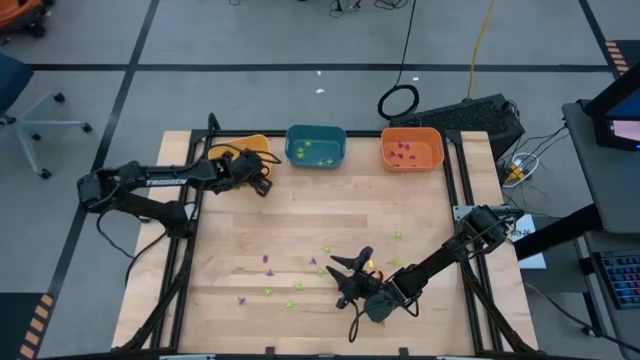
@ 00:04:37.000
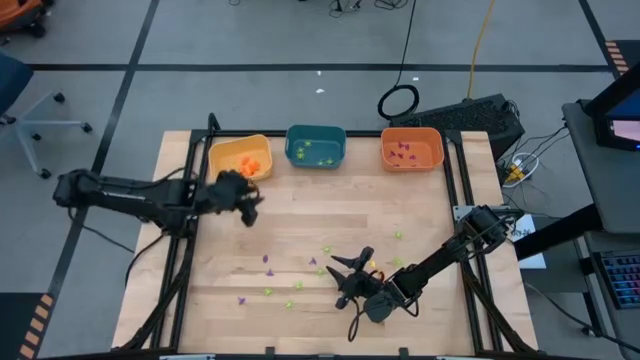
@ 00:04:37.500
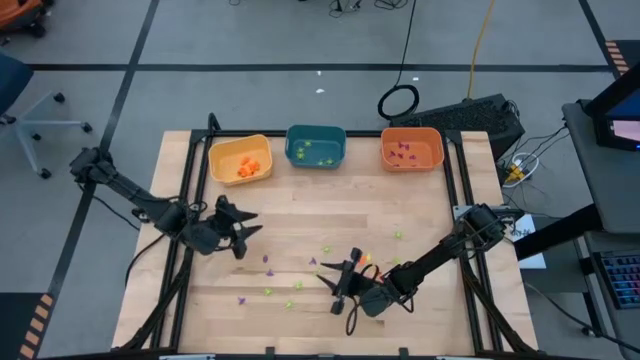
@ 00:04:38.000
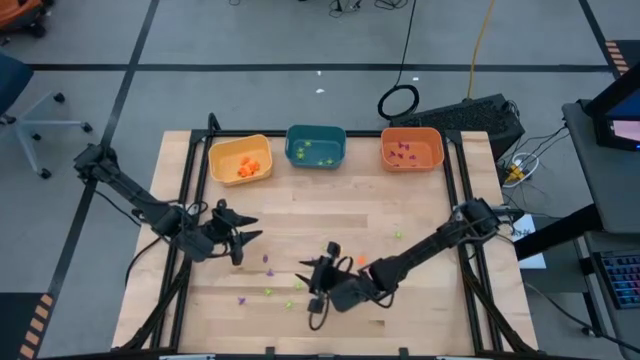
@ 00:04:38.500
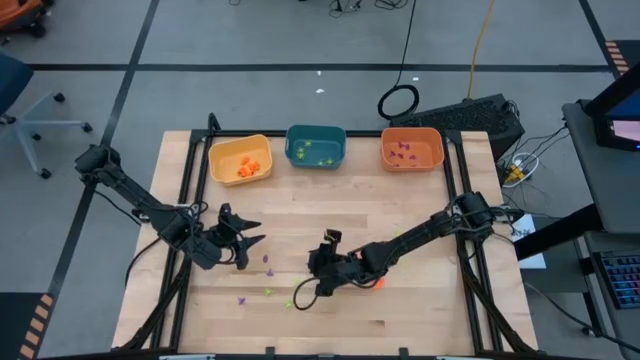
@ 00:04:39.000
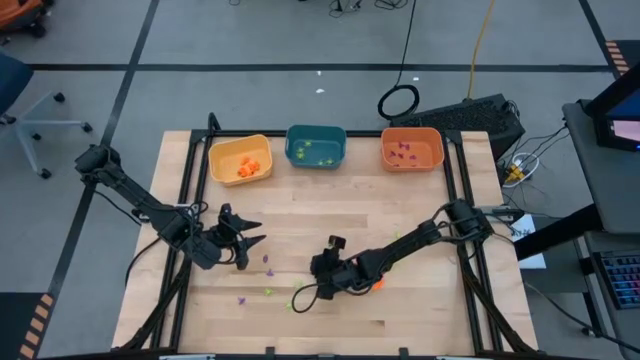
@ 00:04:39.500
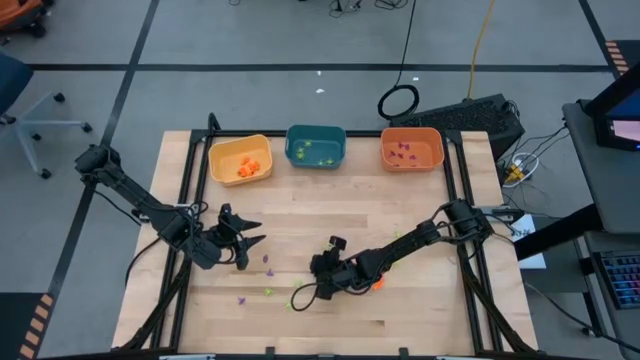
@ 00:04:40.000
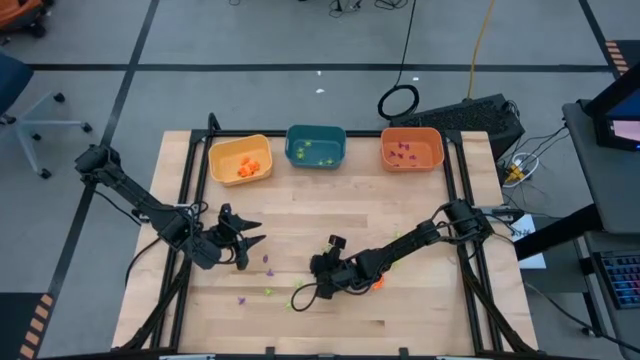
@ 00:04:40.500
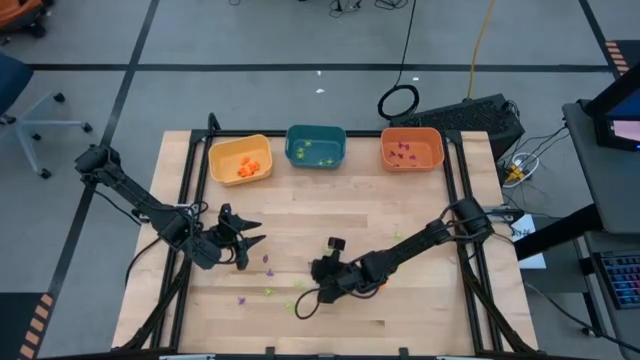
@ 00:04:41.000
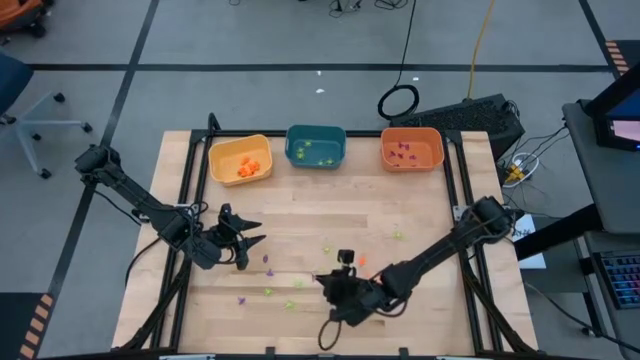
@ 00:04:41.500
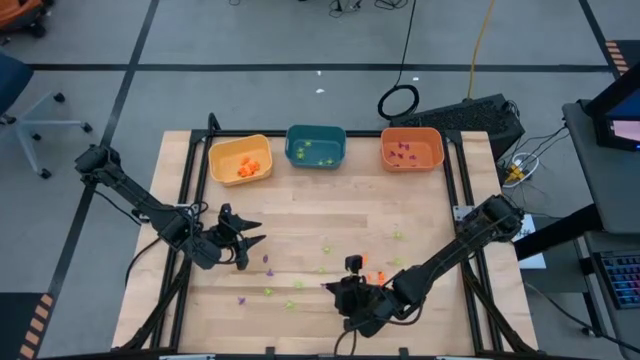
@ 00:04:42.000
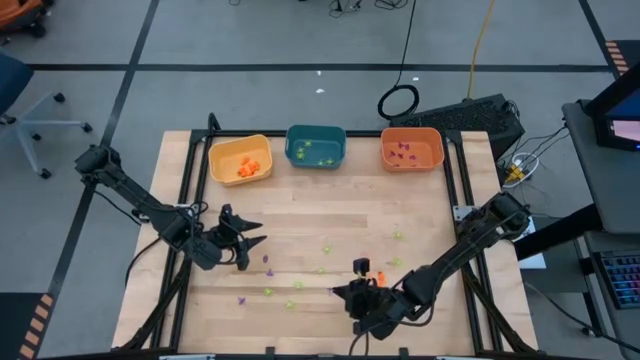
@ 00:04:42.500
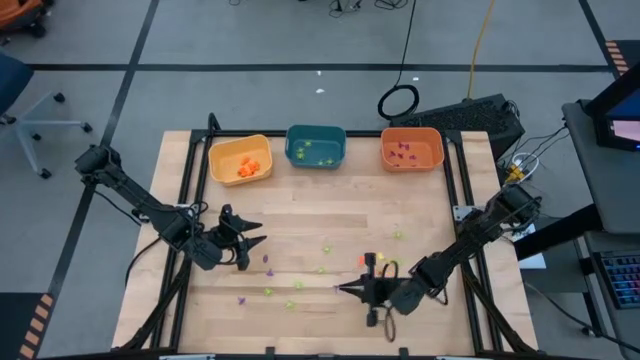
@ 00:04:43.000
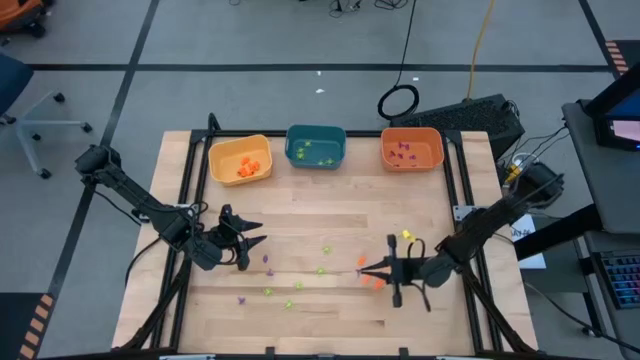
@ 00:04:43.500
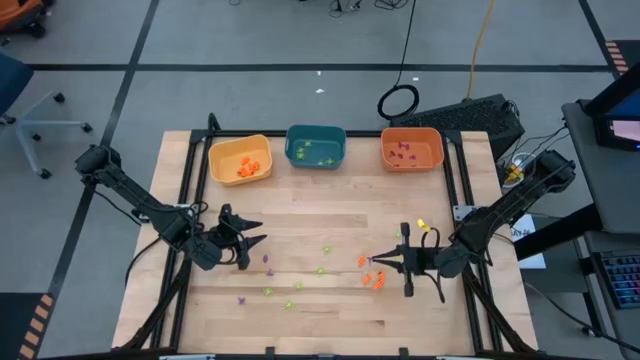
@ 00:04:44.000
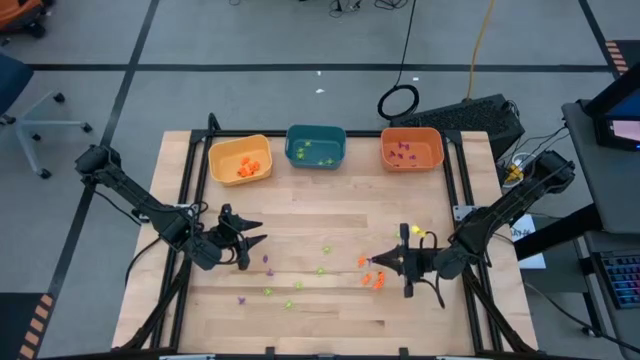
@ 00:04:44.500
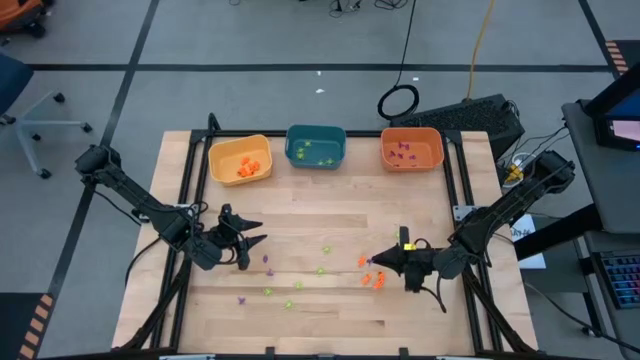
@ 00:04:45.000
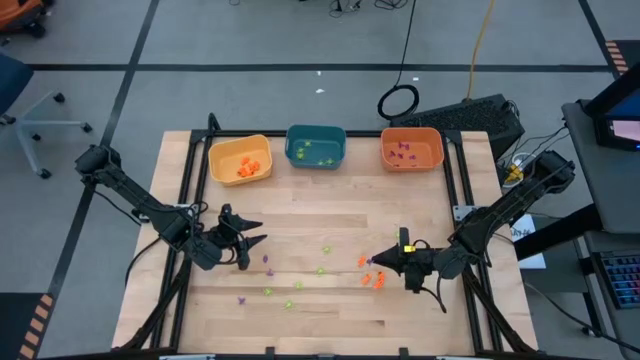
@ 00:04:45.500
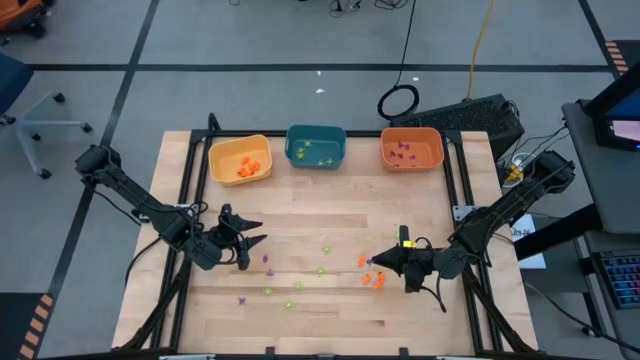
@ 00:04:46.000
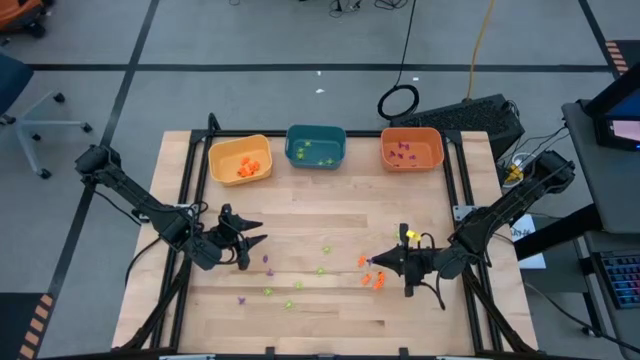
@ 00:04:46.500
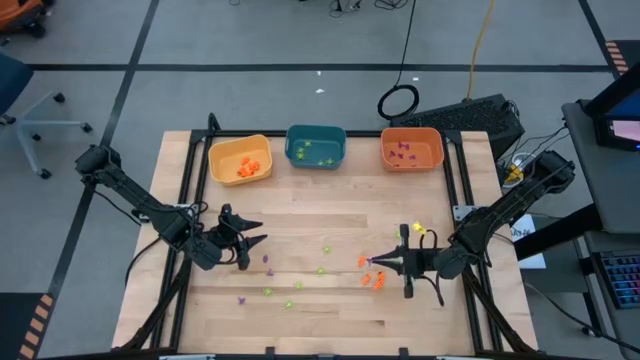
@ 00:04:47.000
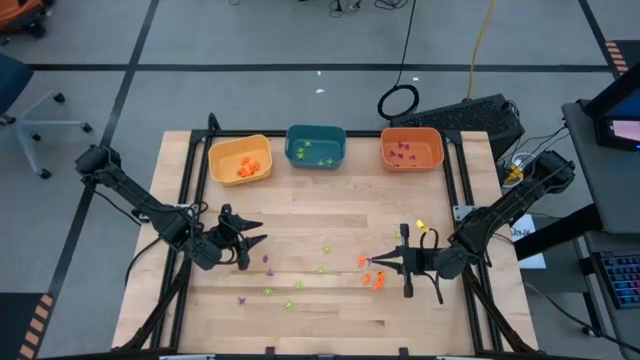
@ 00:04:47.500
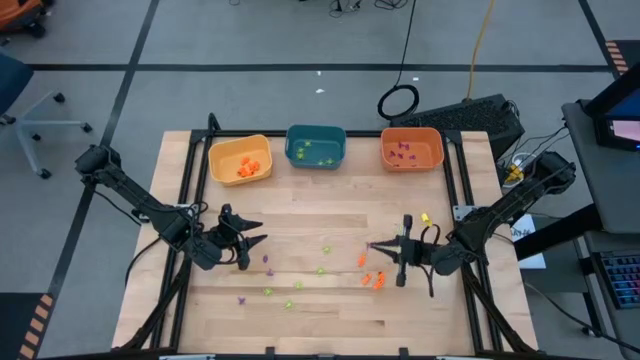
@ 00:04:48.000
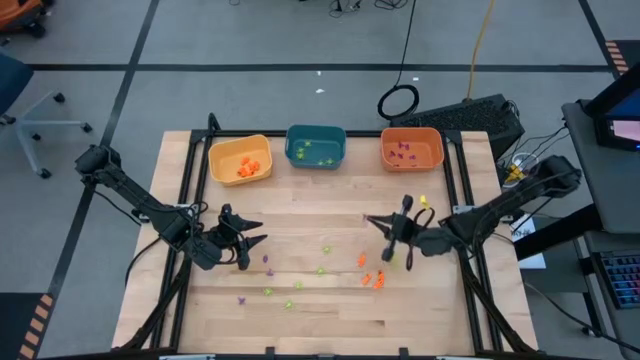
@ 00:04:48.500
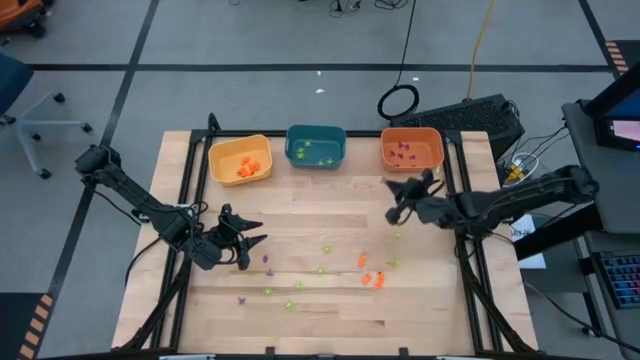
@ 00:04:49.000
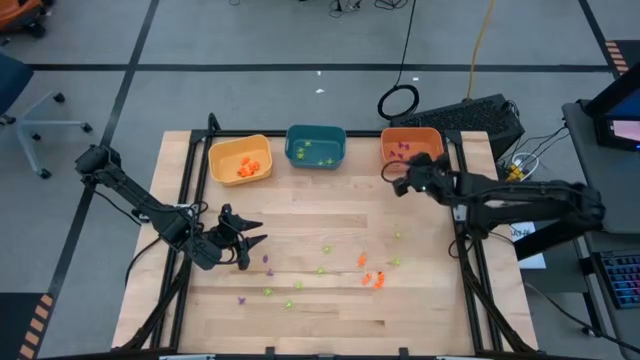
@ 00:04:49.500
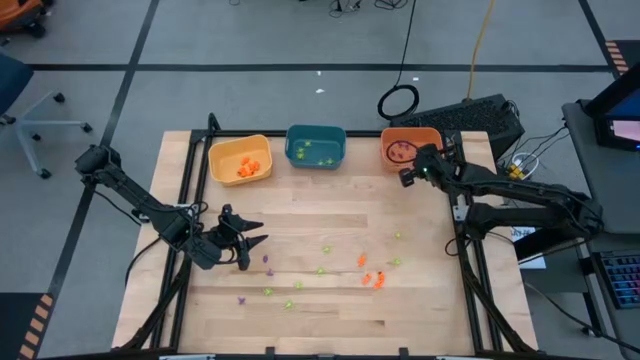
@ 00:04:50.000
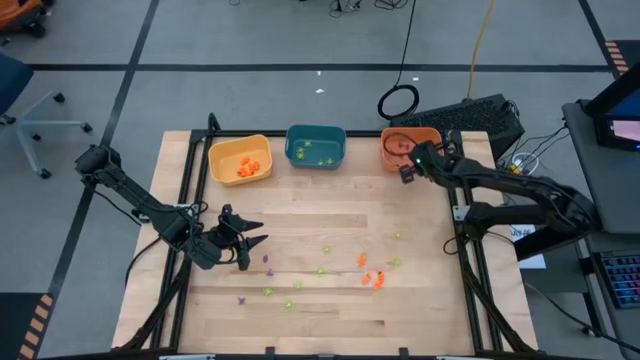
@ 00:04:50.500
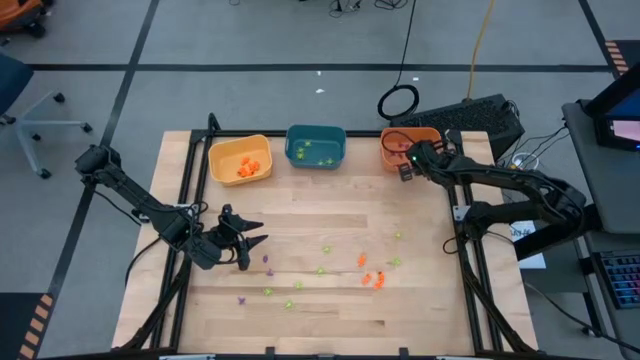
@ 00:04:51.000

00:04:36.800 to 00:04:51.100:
Task: Sort Halloween decoration
Put the violet witch hat toy into the orange bin

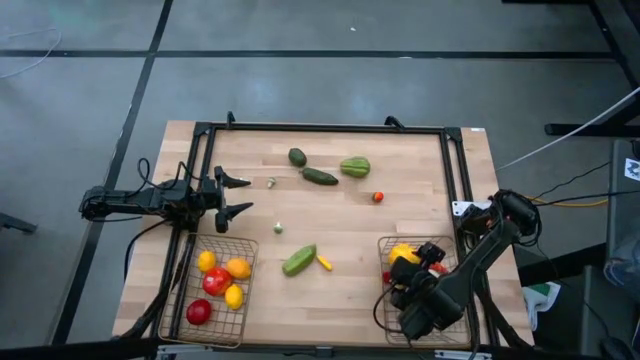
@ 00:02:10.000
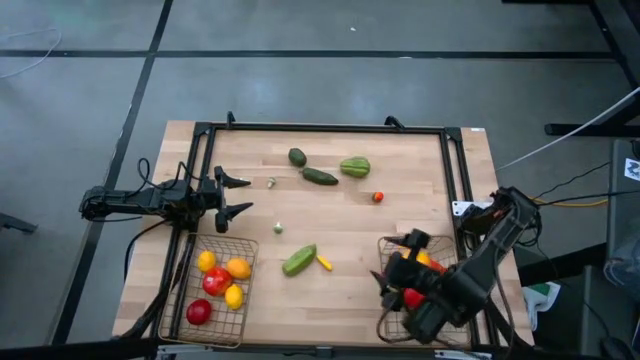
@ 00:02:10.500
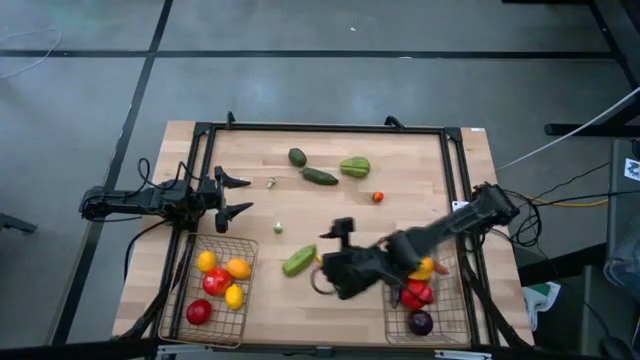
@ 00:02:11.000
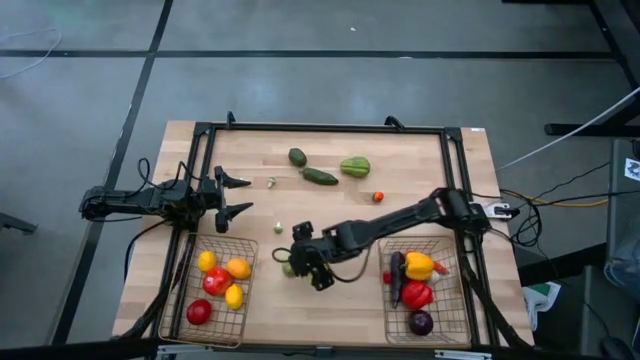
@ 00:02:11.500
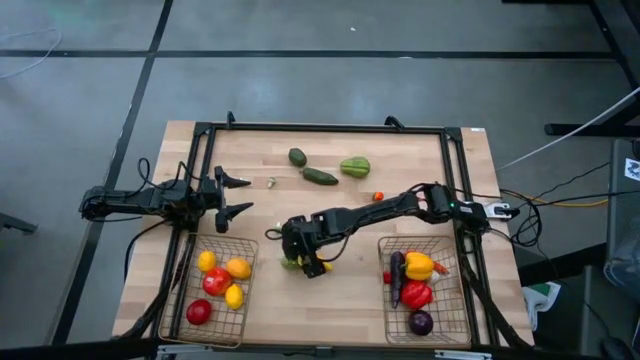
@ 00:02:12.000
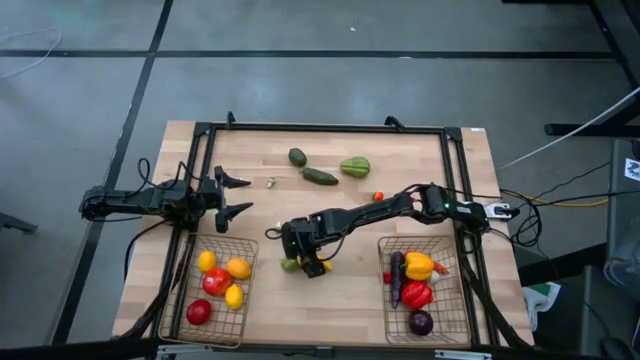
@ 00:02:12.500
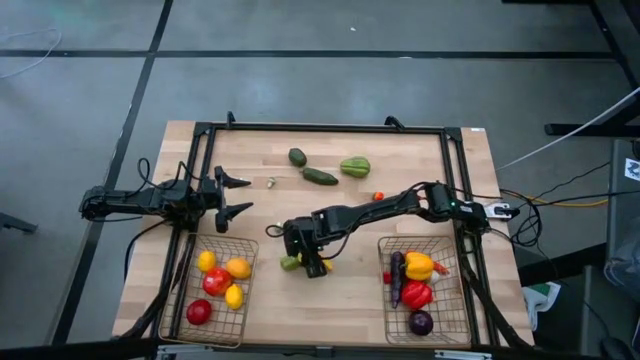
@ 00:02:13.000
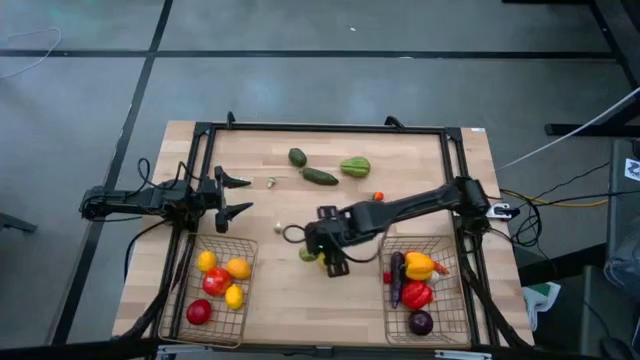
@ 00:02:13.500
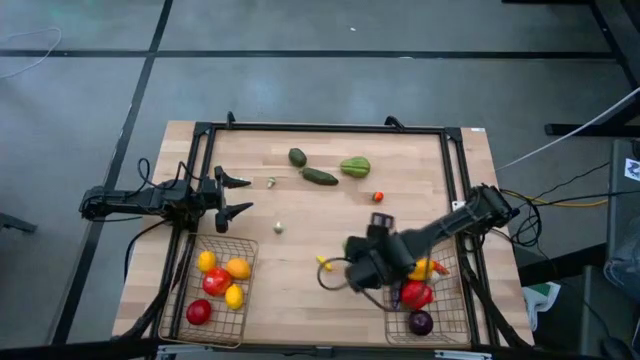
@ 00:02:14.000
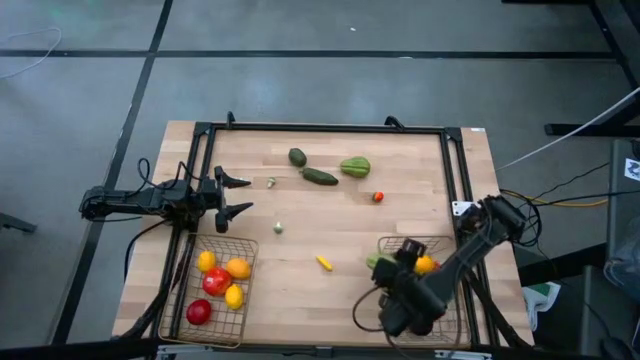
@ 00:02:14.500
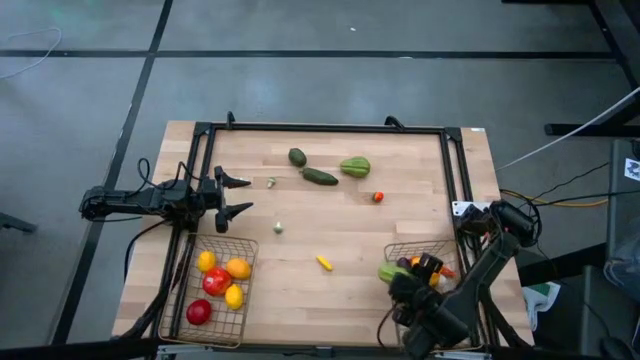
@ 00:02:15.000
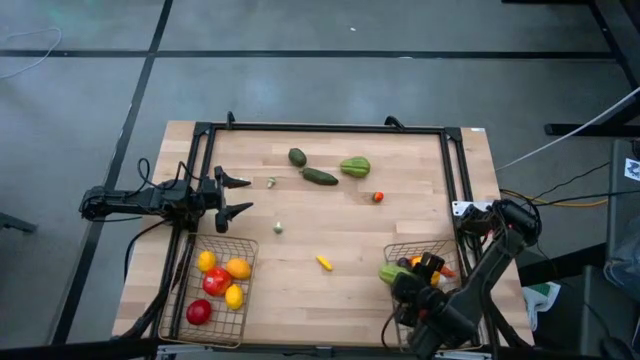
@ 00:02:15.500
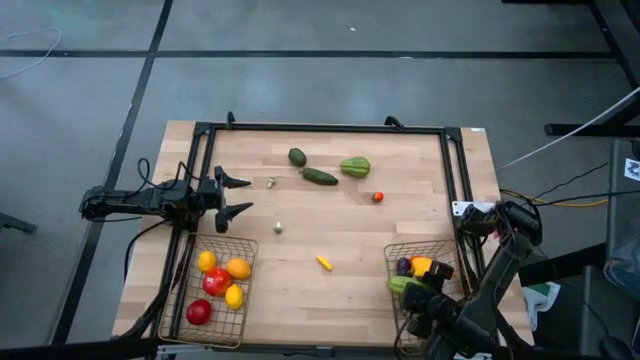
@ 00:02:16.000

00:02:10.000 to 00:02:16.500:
Task: Sort produce into baskets
Put the bottom green chayote into the right wire basket
